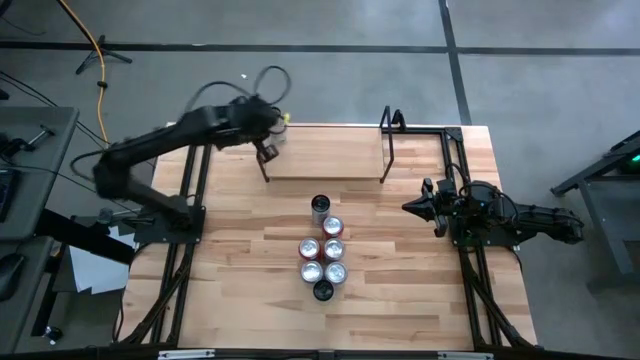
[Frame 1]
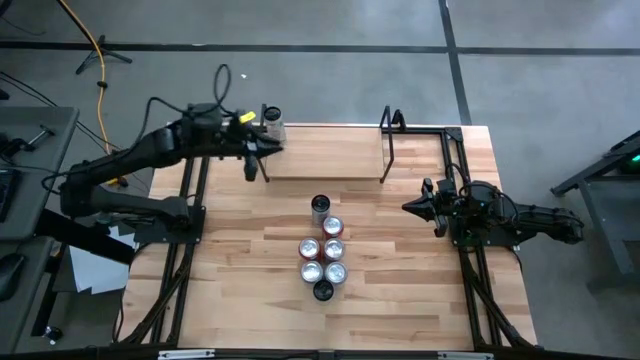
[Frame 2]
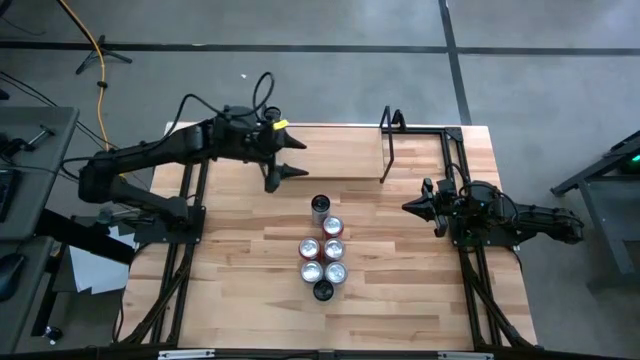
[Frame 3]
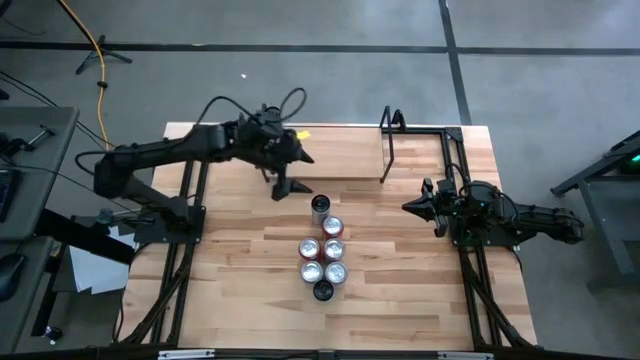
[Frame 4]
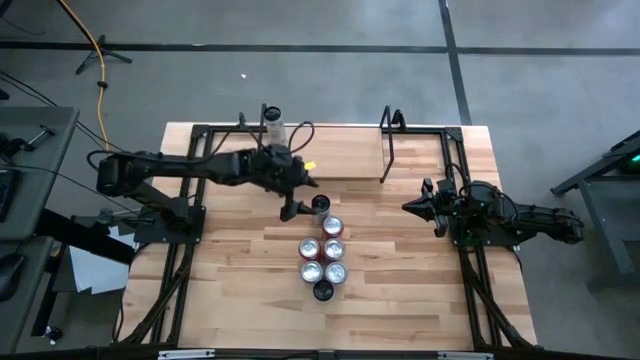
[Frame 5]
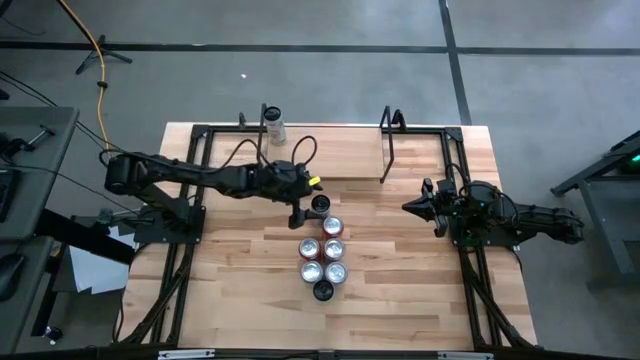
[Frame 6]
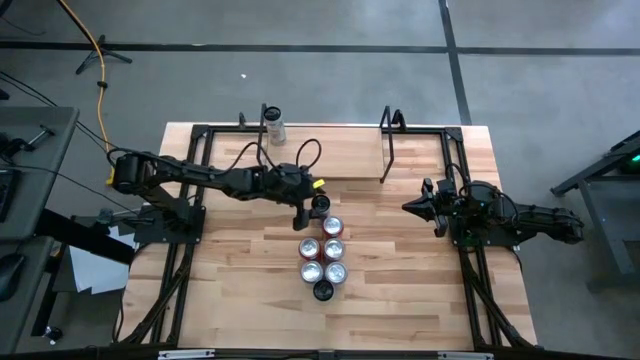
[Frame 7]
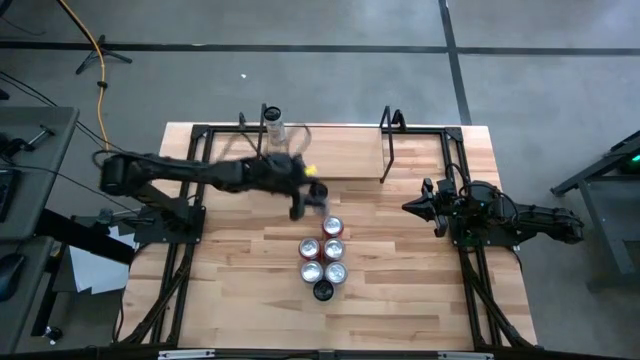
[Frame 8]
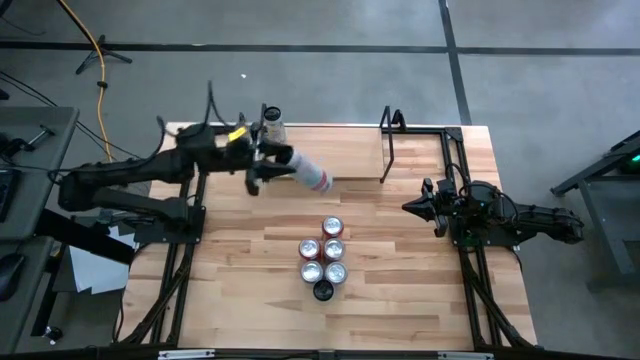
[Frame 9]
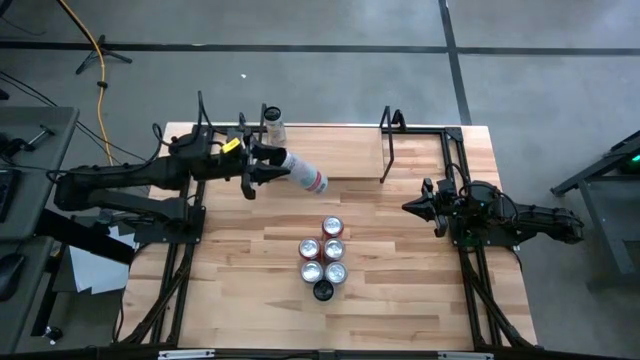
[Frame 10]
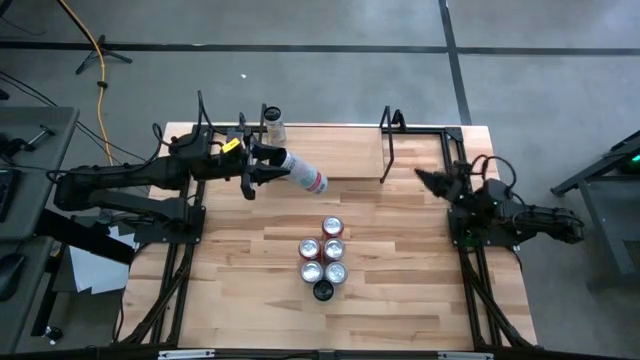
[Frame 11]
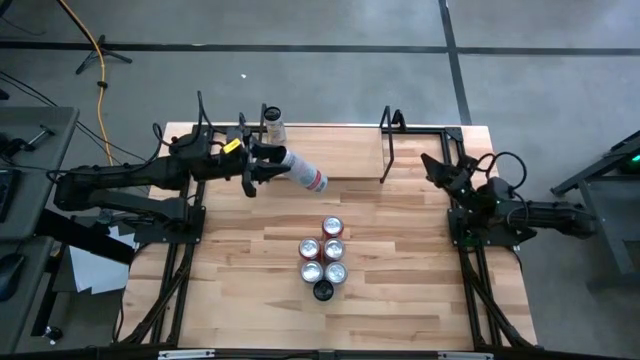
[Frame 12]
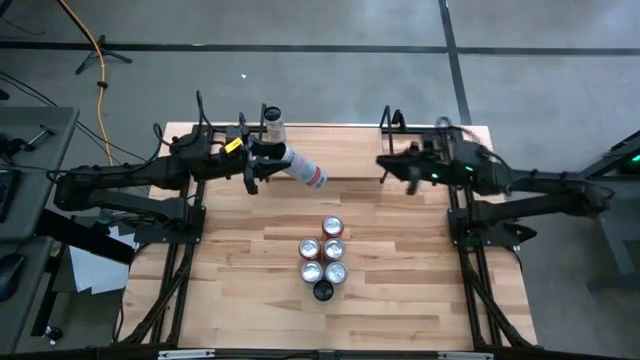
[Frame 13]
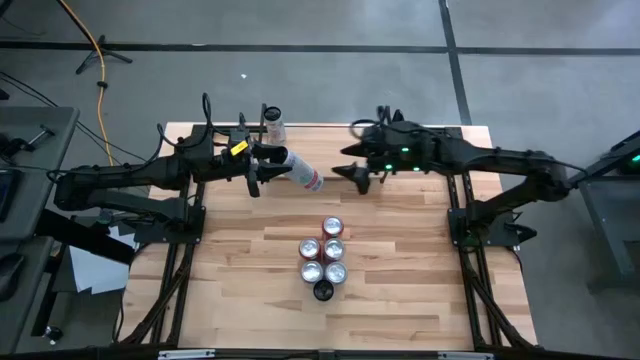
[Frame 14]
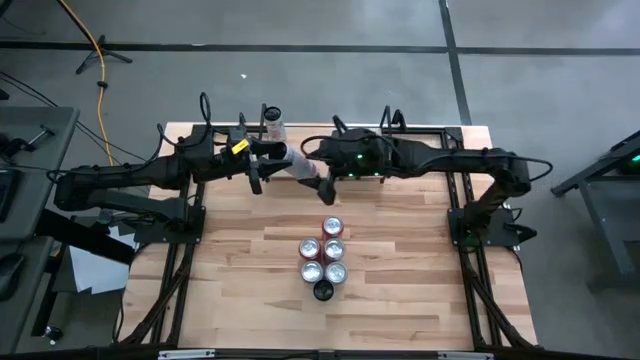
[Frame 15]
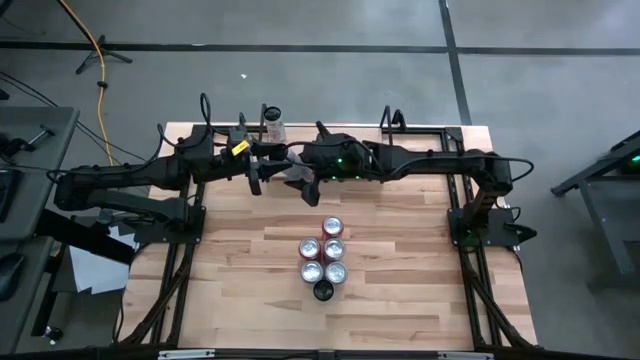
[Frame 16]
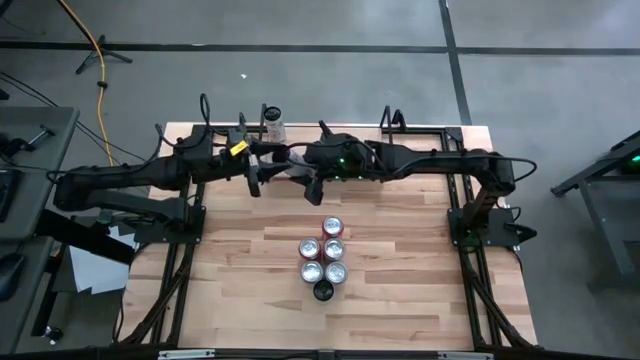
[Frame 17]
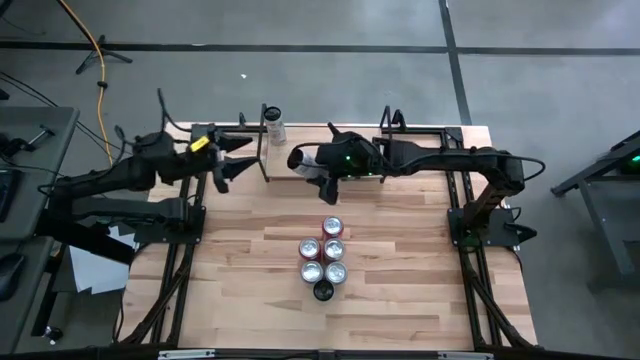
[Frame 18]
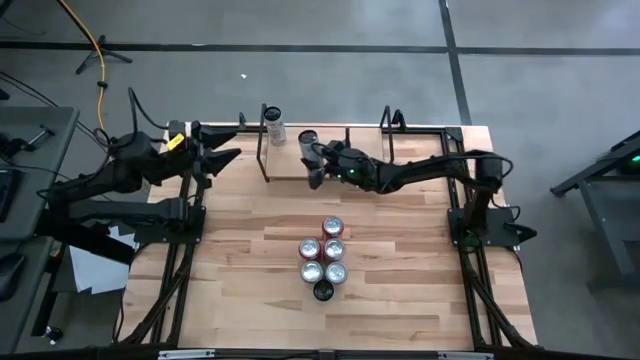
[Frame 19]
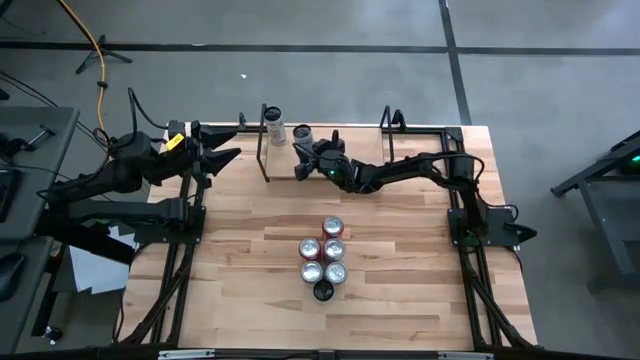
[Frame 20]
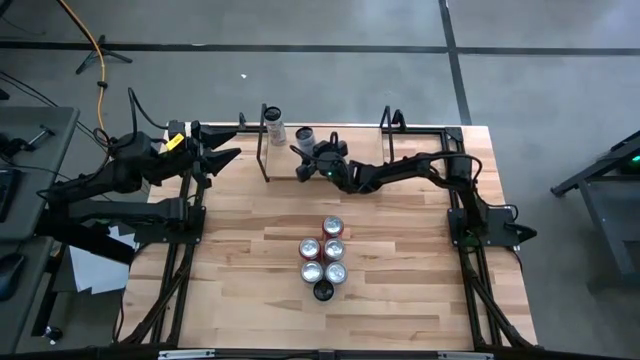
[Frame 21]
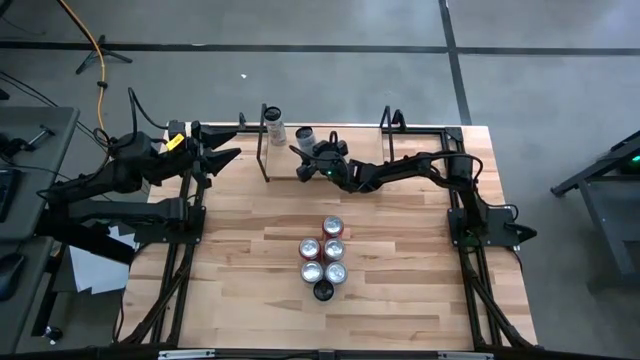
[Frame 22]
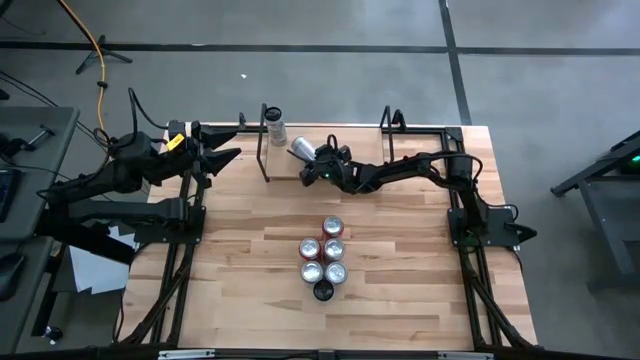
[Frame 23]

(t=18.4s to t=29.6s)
Task: Place canned beverage on shelf
Put the top white soda can aligned with the other white soda can on the shelf

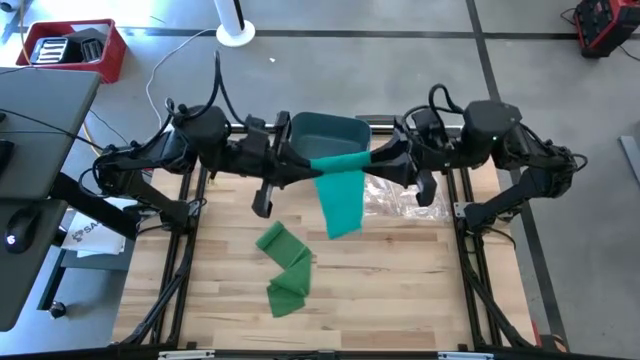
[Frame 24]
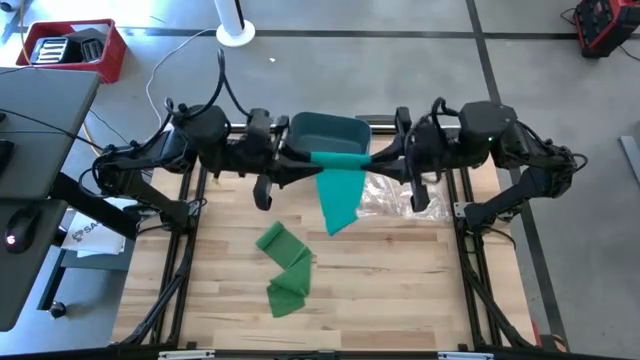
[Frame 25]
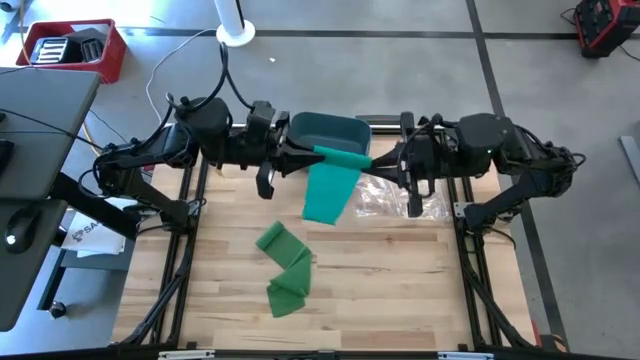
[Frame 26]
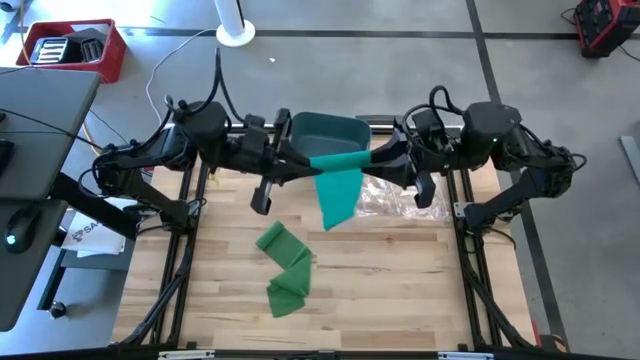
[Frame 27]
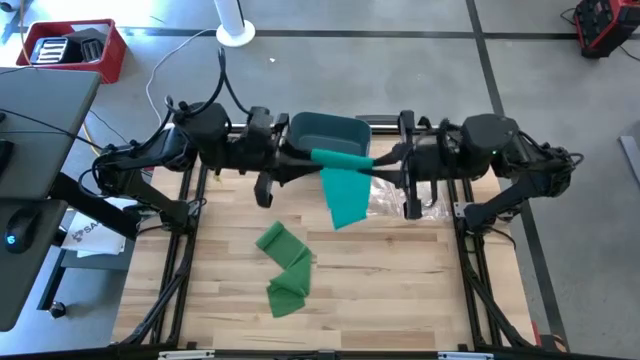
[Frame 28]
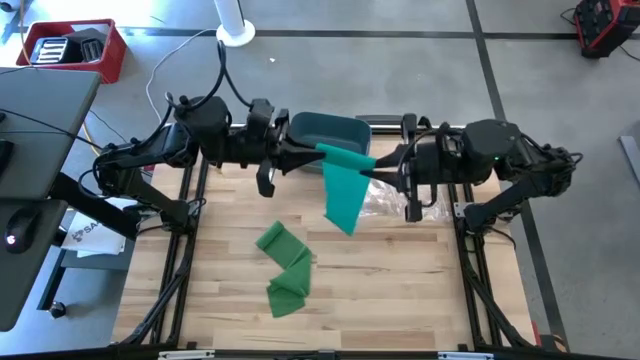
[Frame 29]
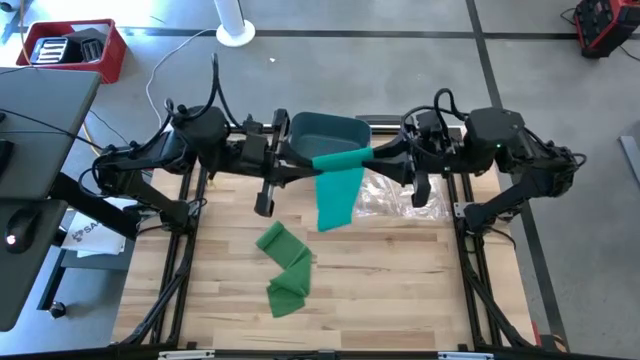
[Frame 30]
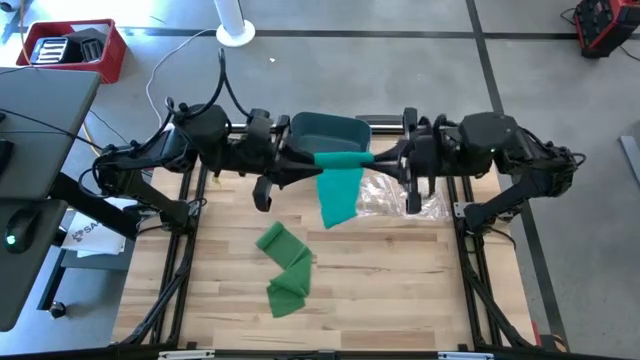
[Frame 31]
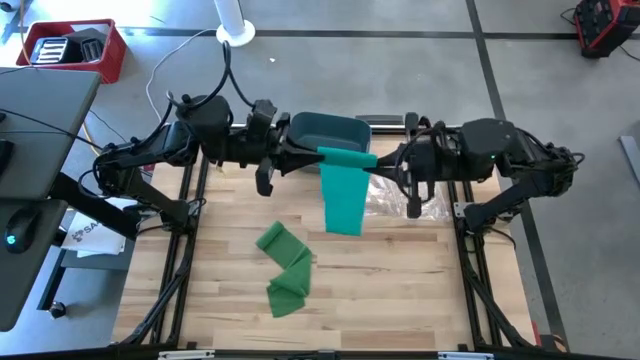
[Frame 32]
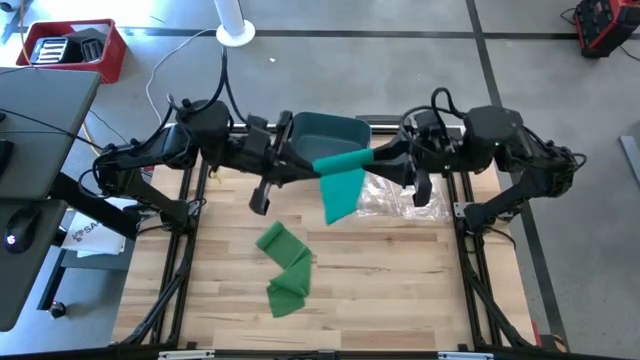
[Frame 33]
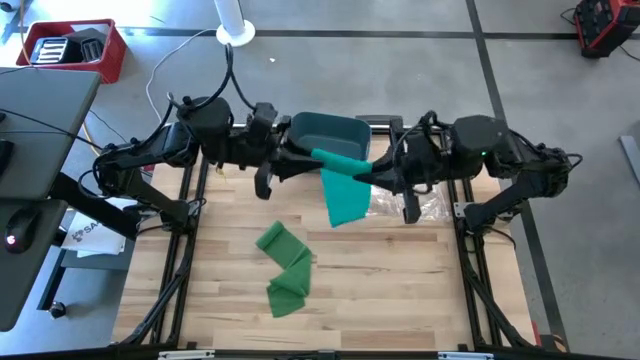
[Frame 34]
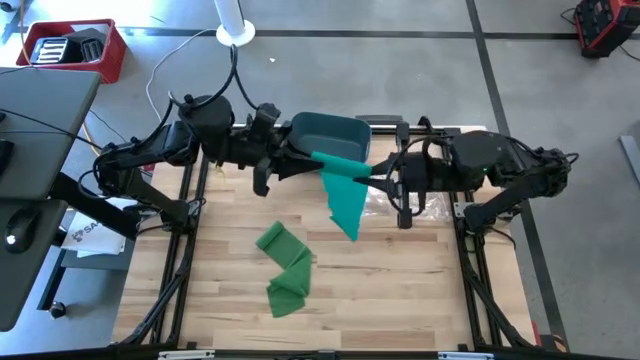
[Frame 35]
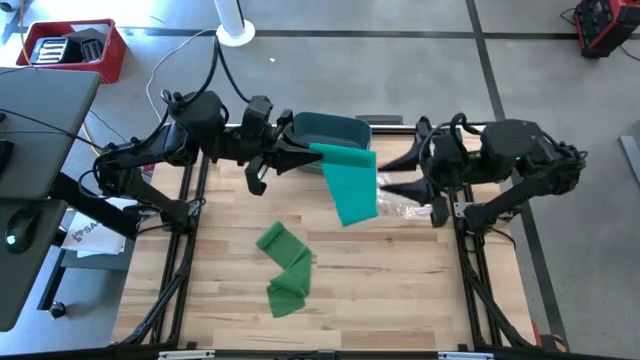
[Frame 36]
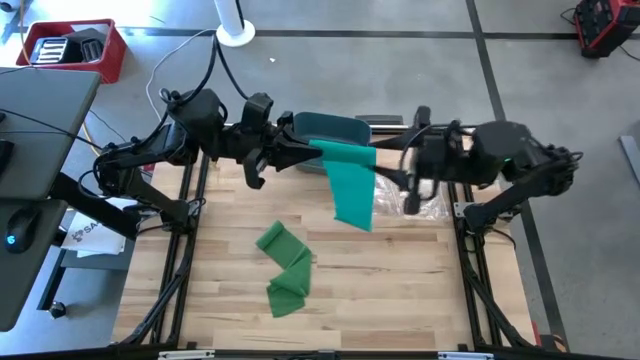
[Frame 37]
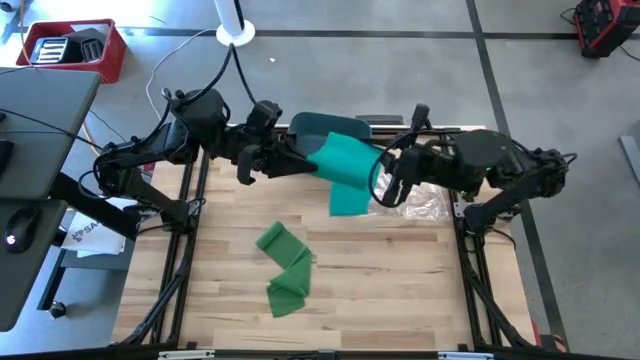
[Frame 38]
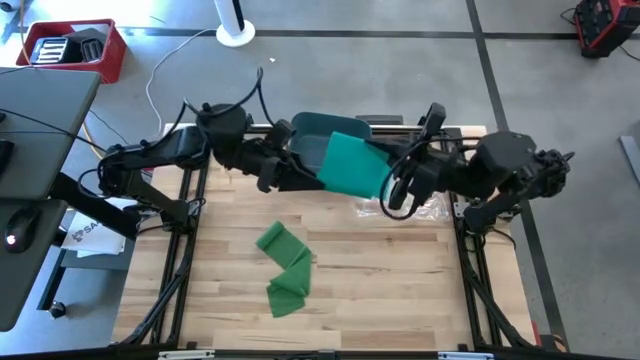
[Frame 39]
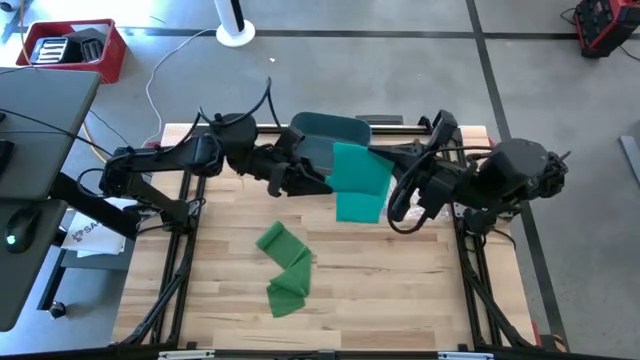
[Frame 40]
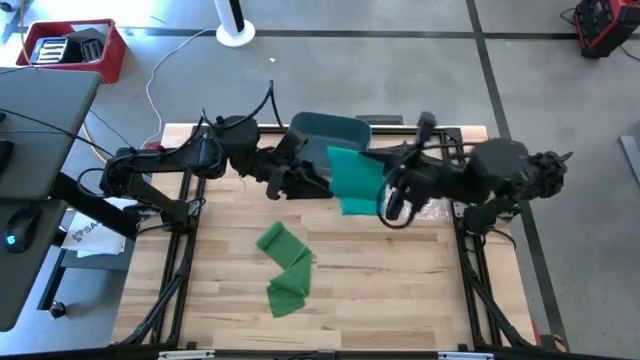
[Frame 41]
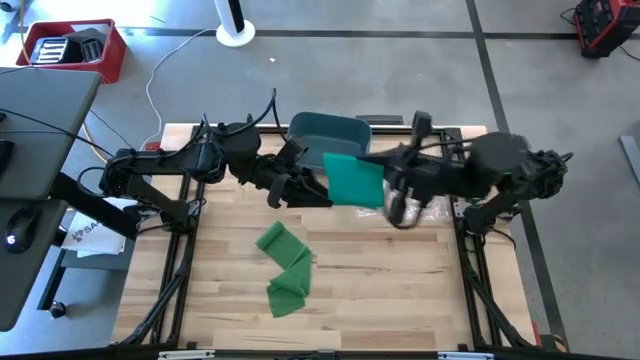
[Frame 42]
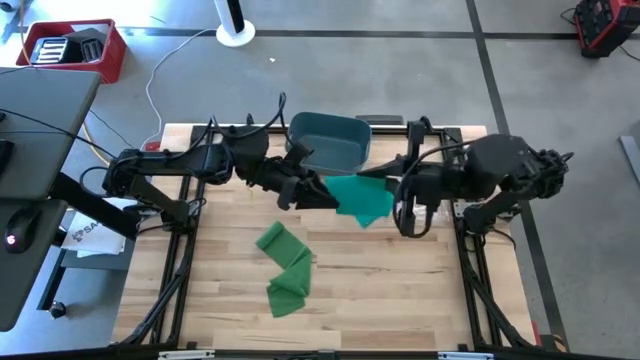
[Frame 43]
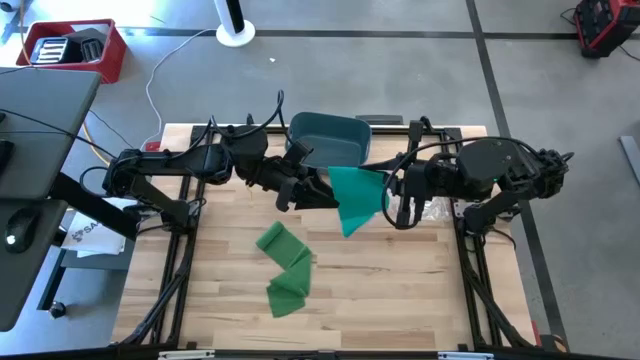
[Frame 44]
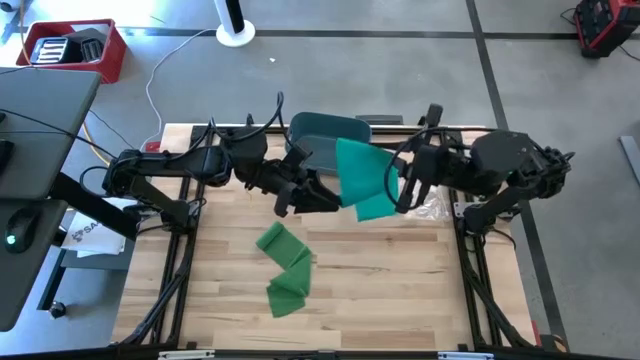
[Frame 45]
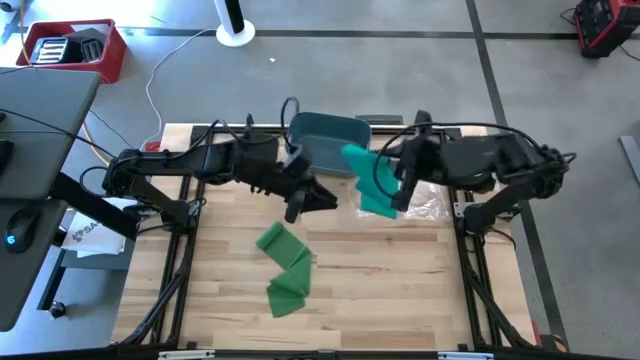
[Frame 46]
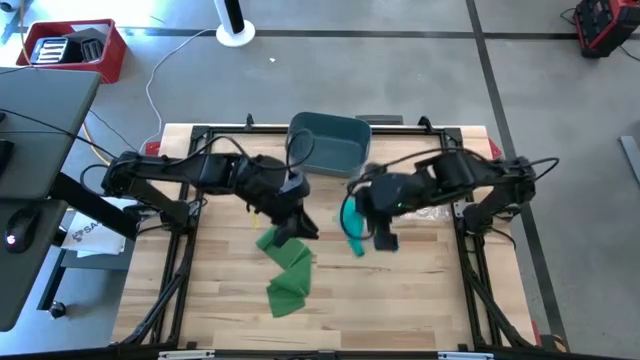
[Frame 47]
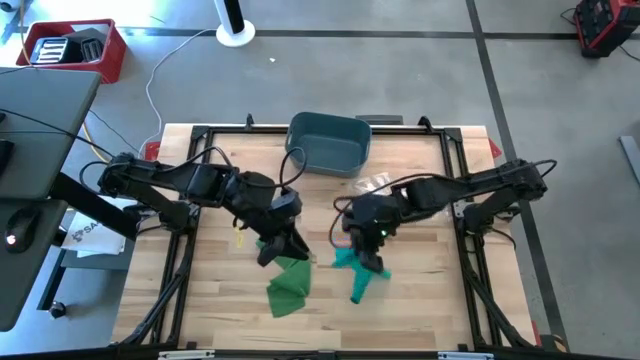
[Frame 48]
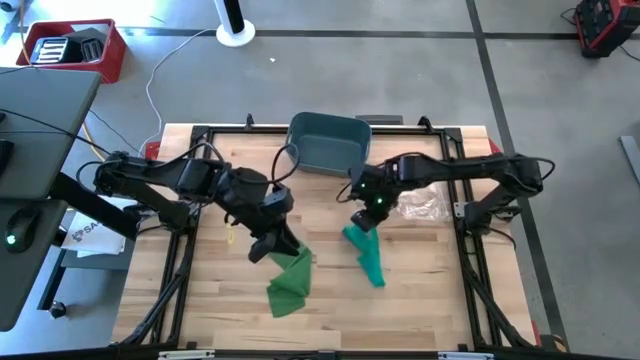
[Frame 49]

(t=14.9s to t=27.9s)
Task: Roll bandage
Roll the blue bandage
